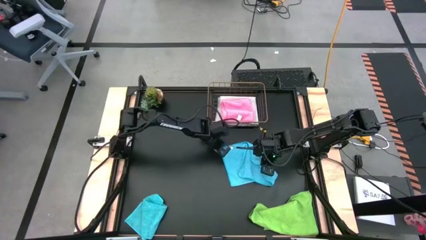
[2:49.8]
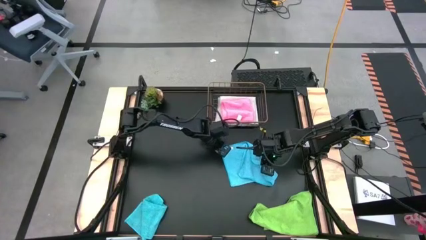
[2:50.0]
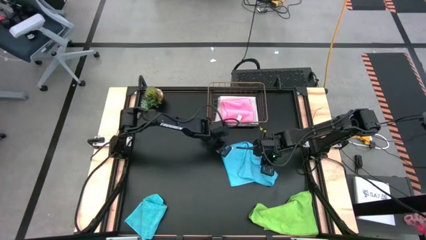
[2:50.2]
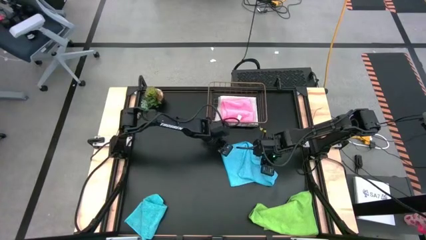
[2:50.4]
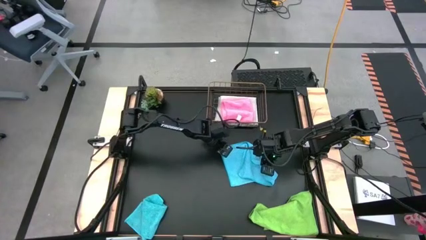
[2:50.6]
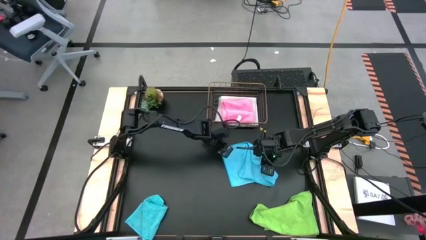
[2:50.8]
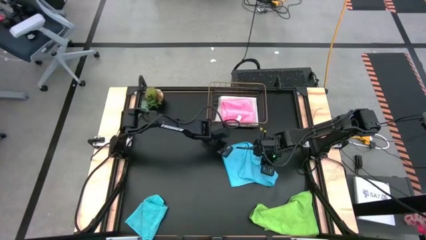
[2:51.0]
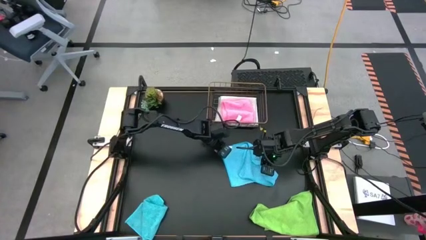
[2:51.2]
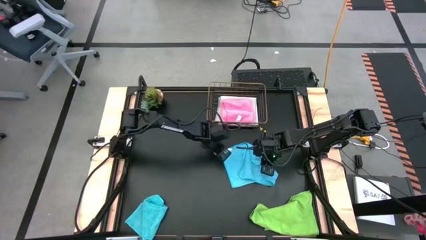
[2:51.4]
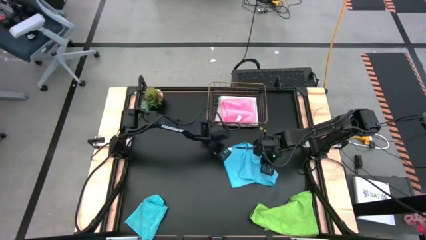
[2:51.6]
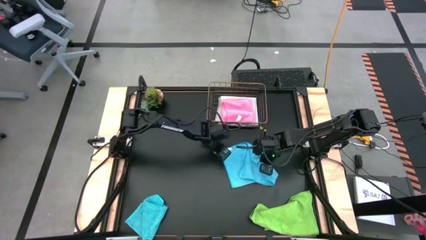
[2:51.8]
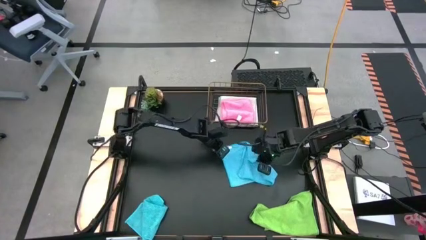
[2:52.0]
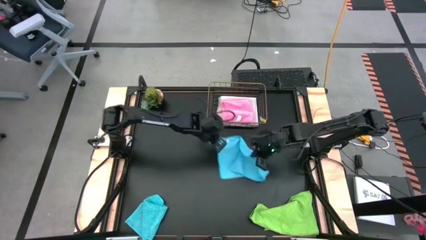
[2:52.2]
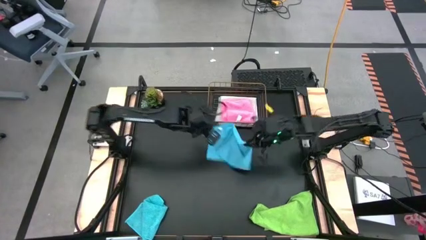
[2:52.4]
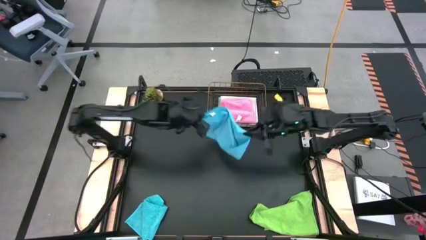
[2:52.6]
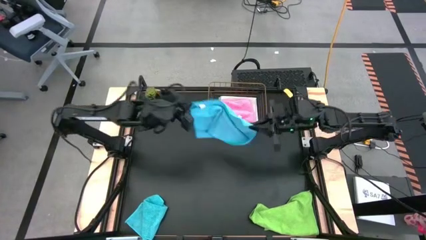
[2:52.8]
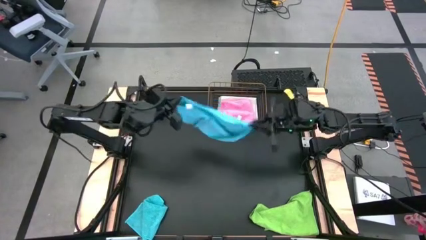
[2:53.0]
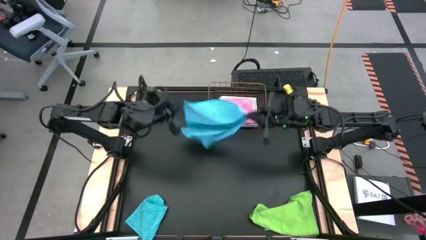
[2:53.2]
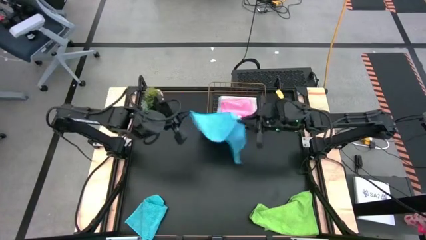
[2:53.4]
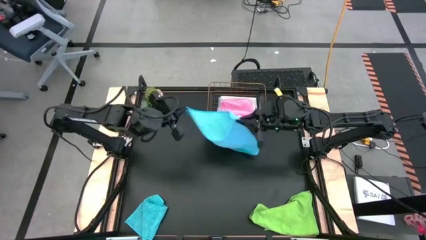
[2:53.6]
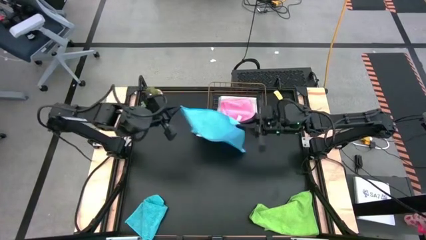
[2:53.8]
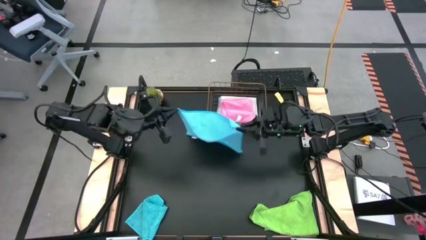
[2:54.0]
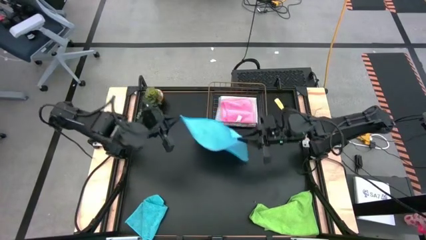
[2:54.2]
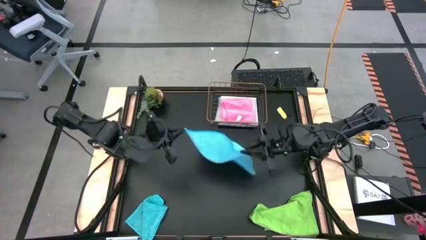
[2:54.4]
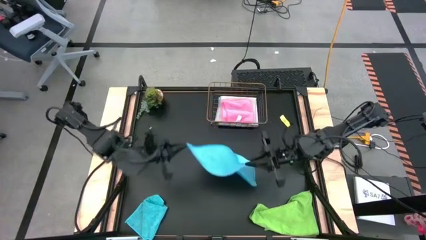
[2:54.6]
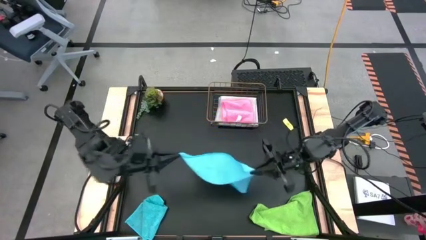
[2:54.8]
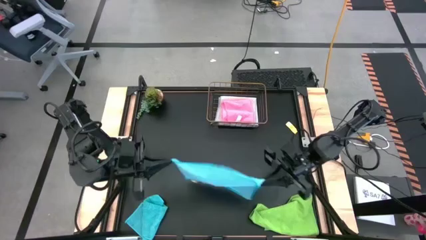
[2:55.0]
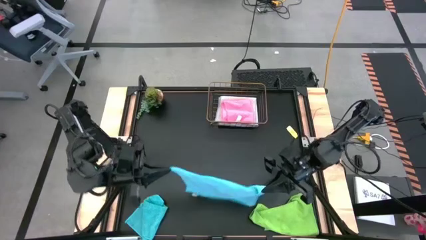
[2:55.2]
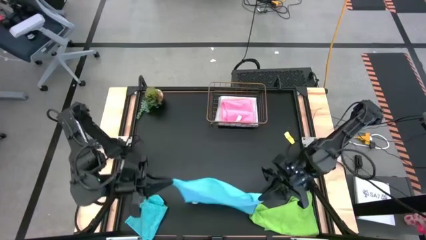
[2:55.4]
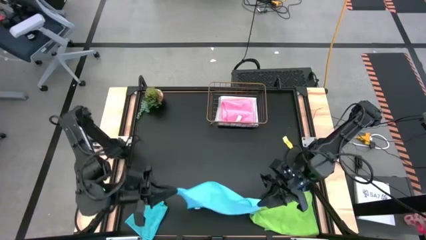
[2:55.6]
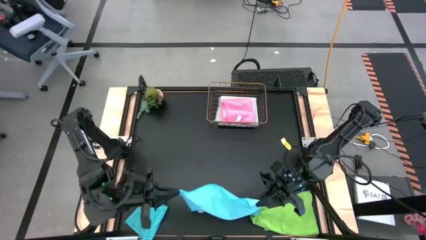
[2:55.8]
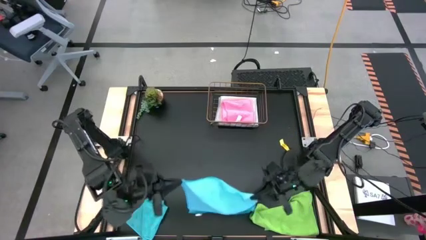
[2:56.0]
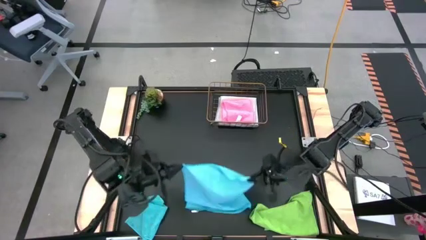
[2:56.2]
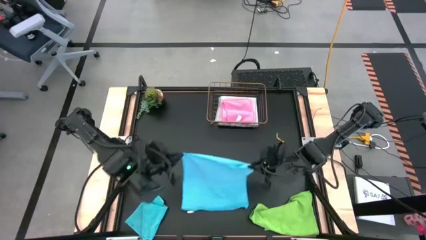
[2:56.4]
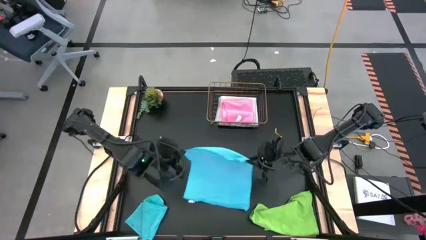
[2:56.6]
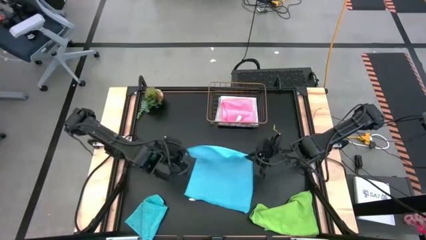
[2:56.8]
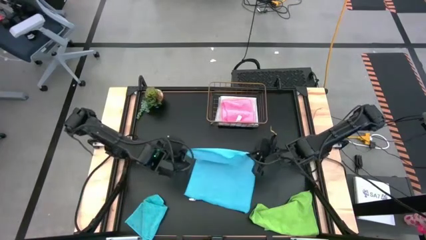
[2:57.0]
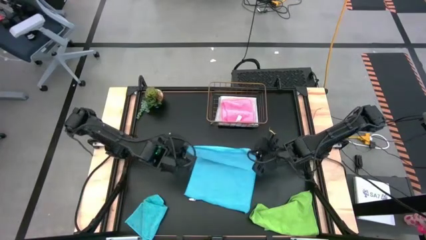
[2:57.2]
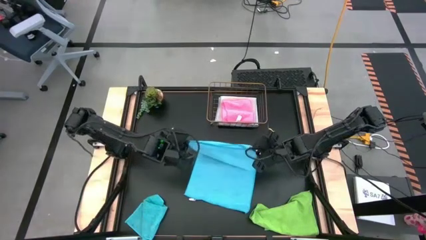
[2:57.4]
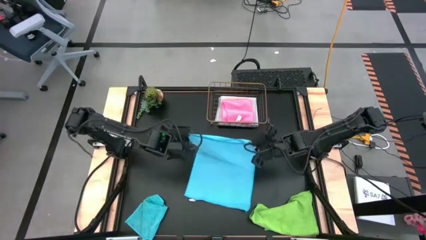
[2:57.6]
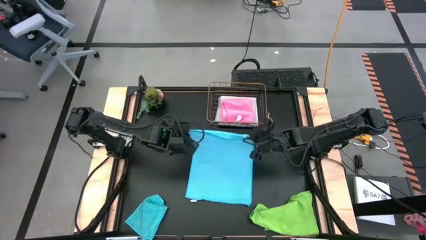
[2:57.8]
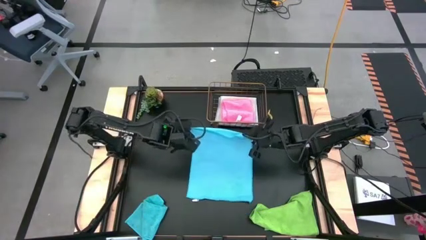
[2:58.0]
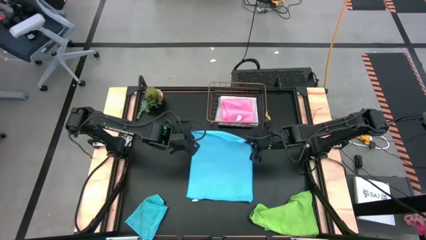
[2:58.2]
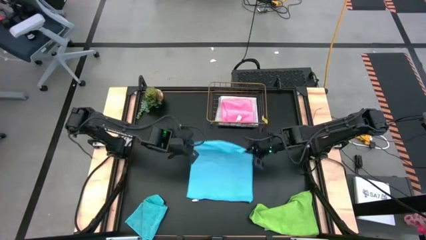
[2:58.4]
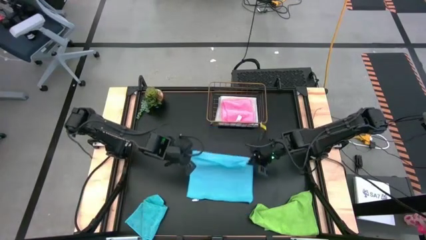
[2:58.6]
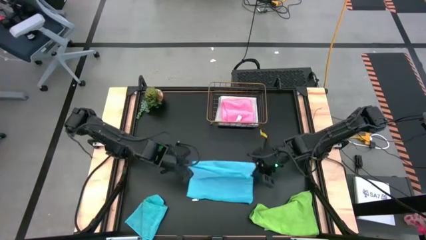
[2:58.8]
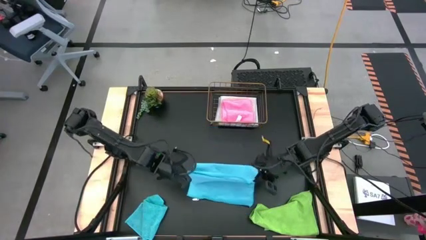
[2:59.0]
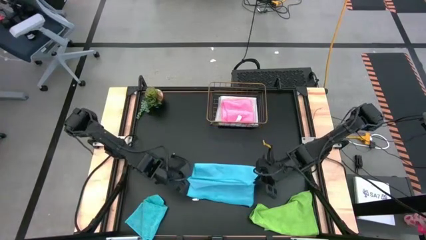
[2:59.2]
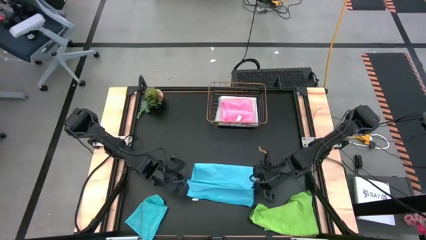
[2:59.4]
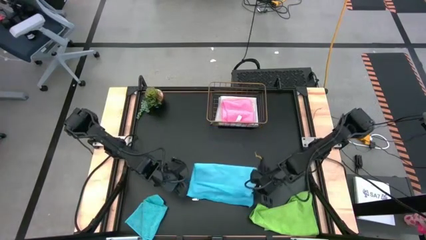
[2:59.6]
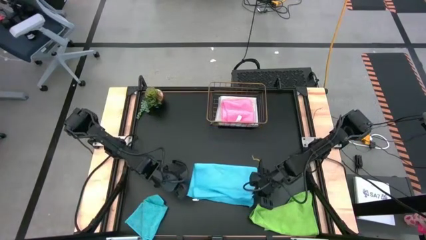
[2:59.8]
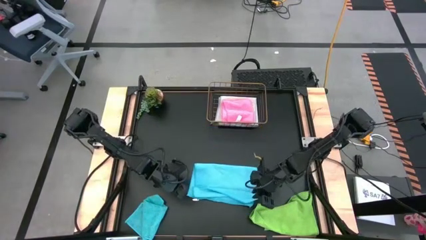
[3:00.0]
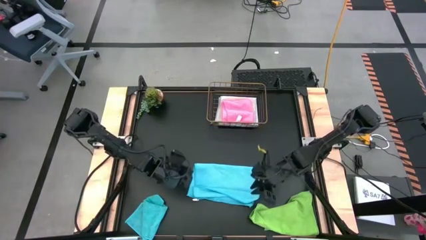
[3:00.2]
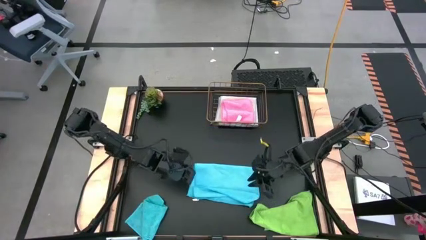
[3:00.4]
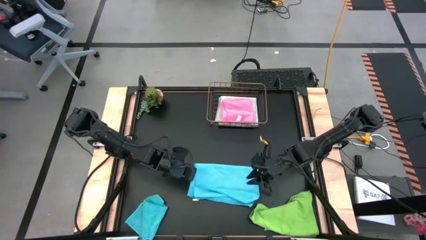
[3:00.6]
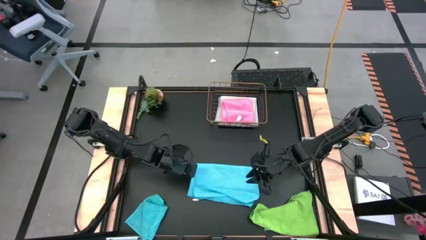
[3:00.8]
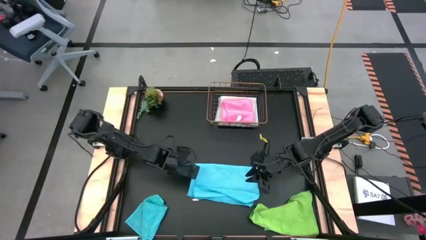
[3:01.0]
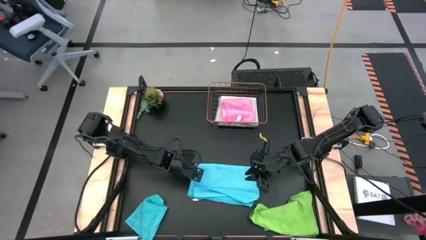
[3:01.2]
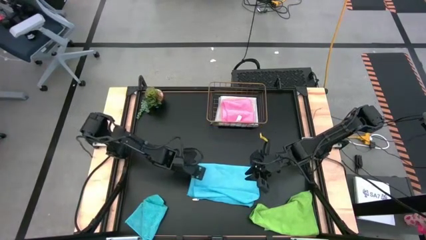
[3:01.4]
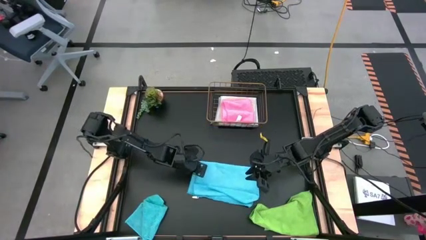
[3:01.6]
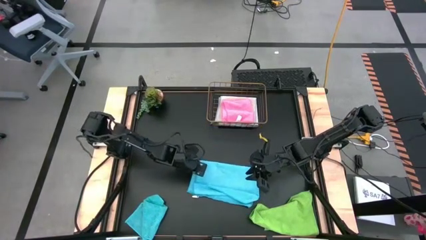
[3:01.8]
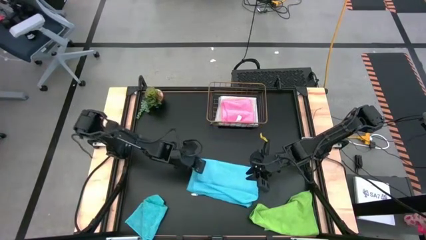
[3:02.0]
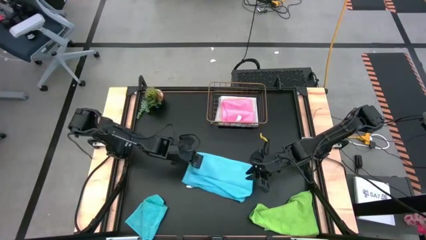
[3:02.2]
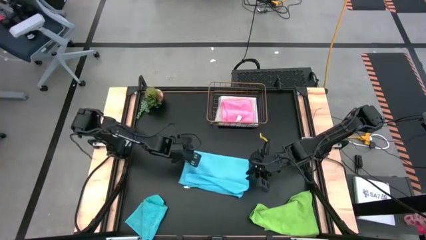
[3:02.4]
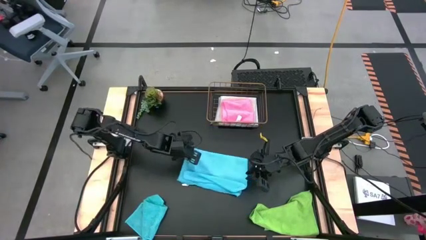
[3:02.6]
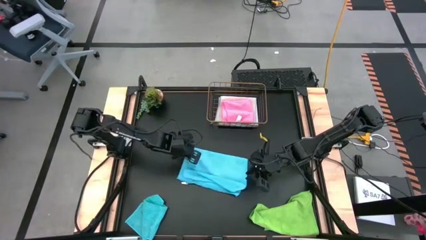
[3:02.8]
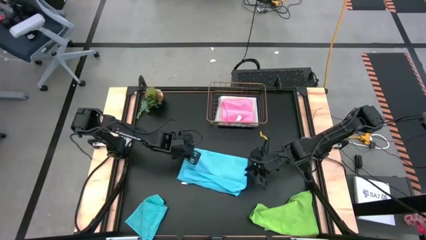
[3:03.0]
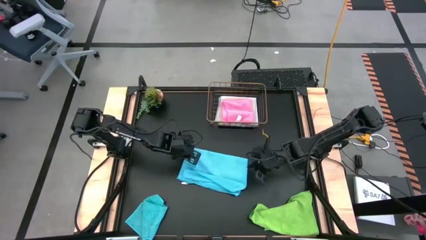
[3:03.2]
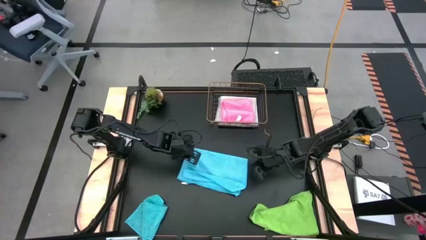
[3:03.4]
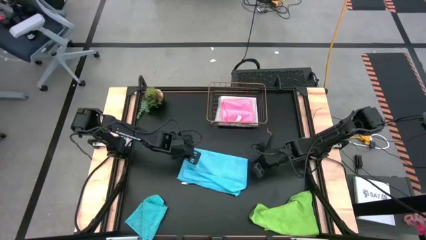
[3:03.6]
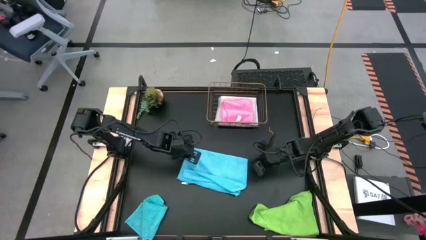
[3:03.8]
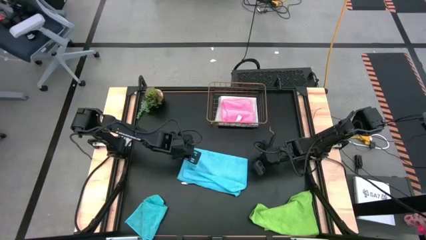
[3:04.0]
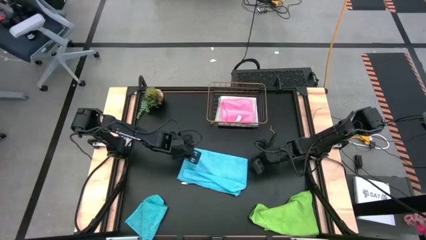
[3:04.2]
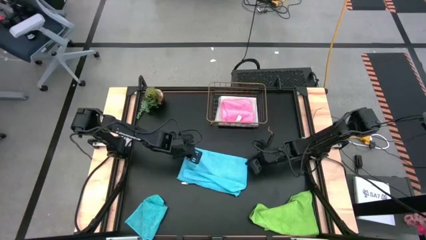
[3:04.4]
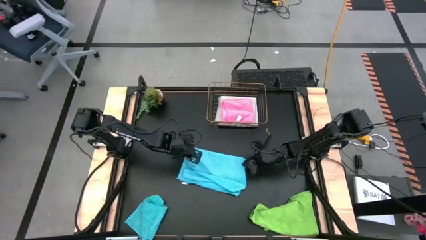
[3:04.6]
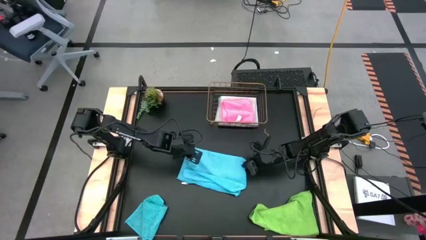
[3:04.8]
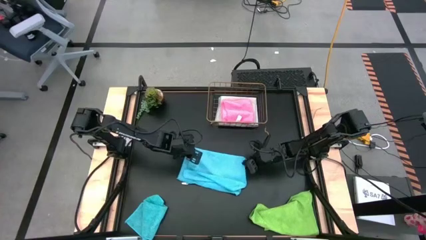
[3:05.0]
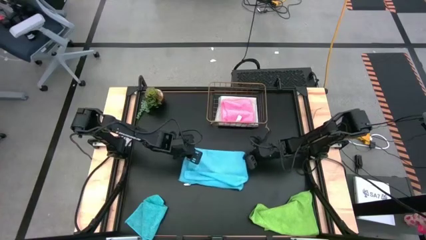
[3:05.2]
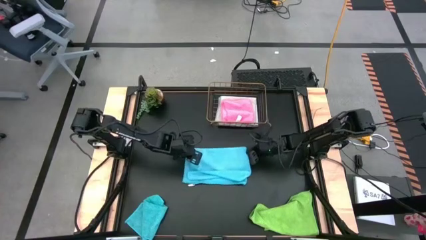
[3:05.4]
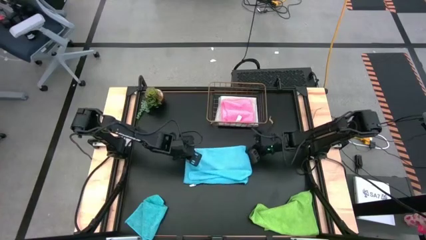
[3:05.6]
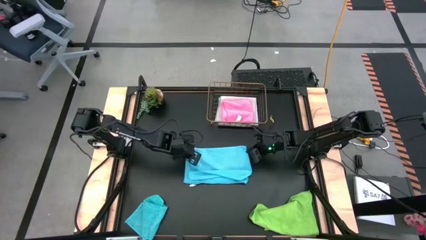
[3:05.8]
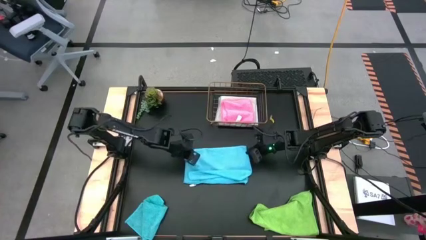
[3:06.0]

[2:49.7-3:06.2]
Task: Fold microfiber towels
Fold the right blue towel
